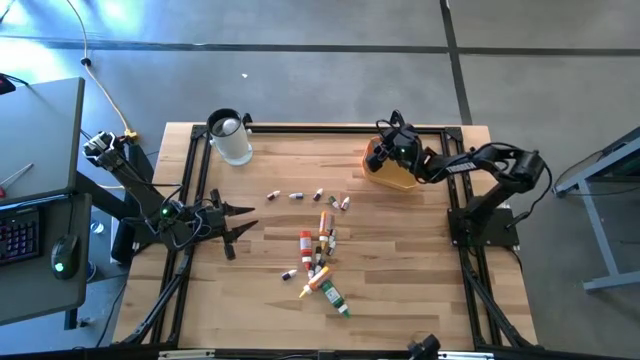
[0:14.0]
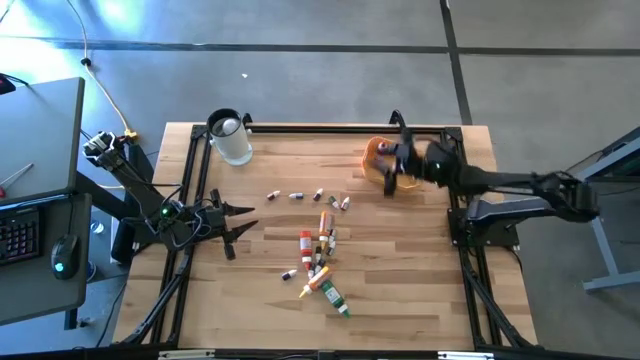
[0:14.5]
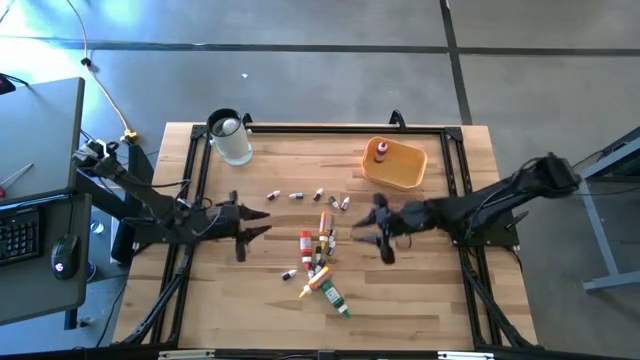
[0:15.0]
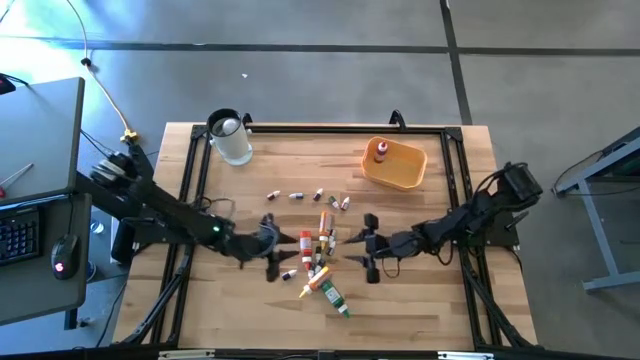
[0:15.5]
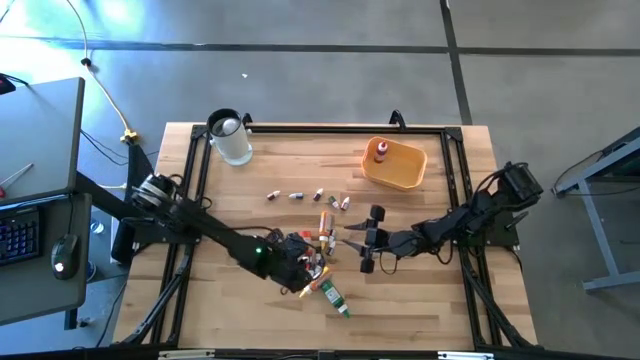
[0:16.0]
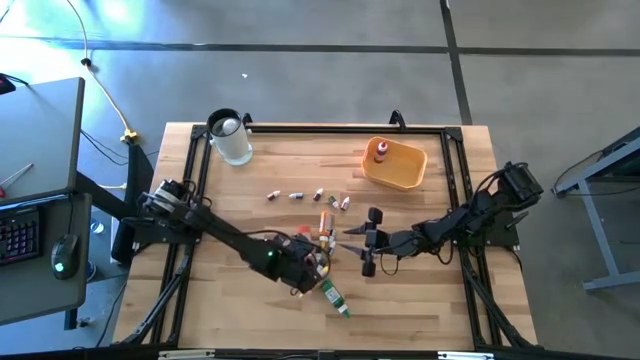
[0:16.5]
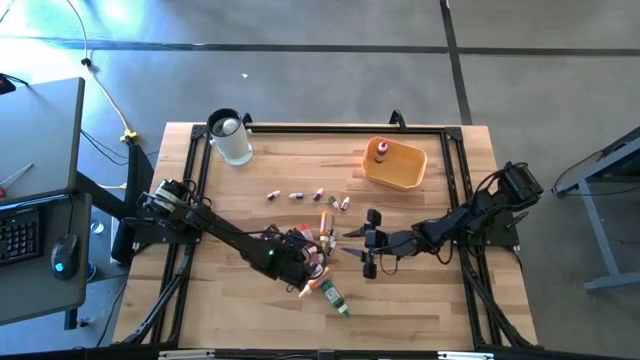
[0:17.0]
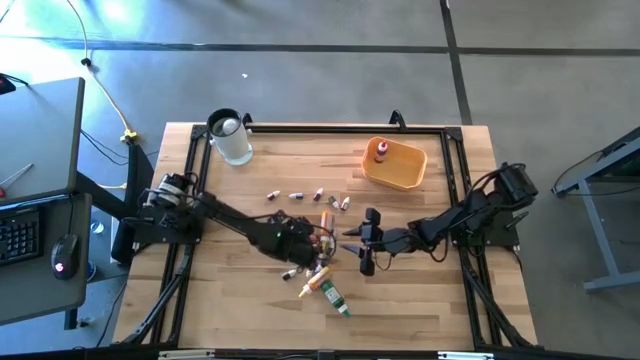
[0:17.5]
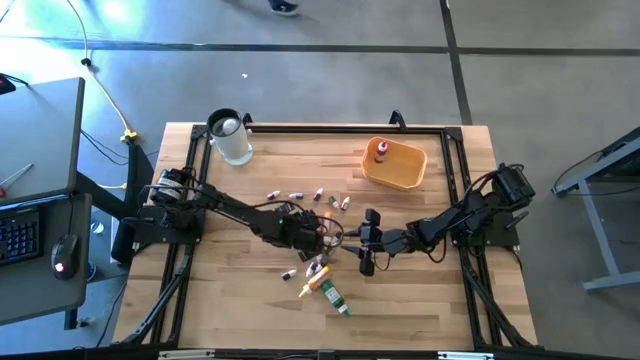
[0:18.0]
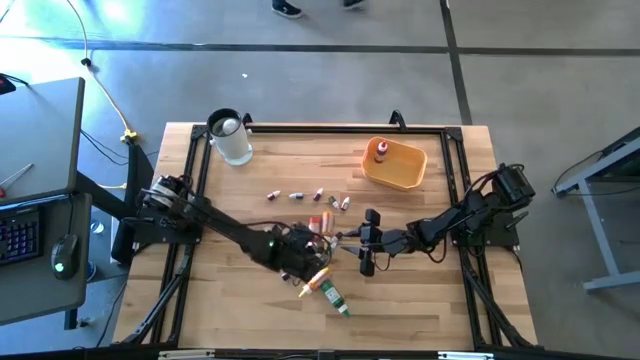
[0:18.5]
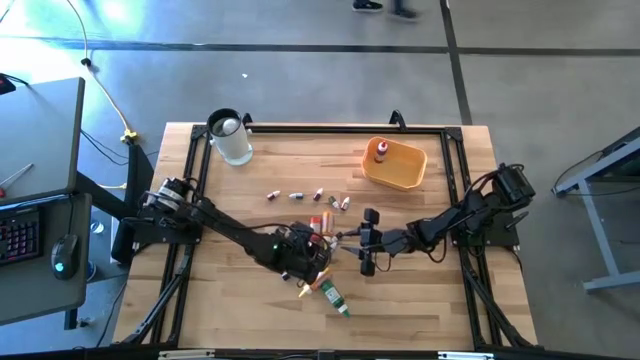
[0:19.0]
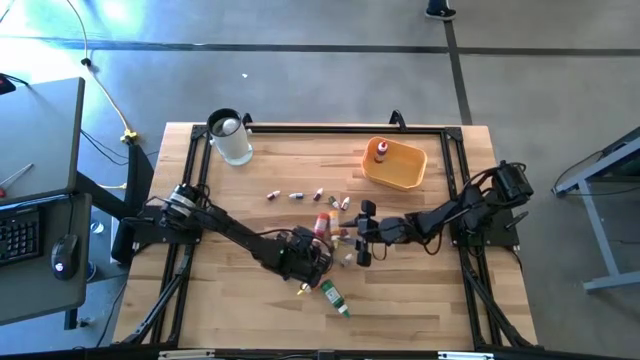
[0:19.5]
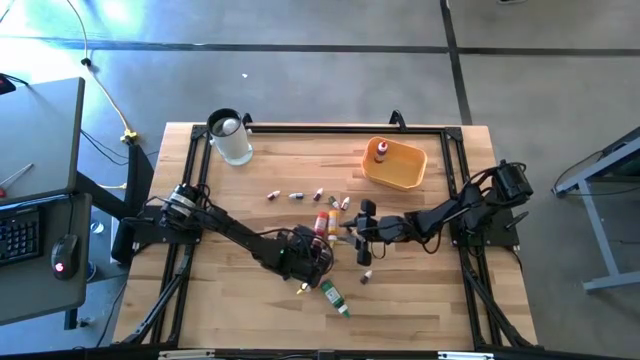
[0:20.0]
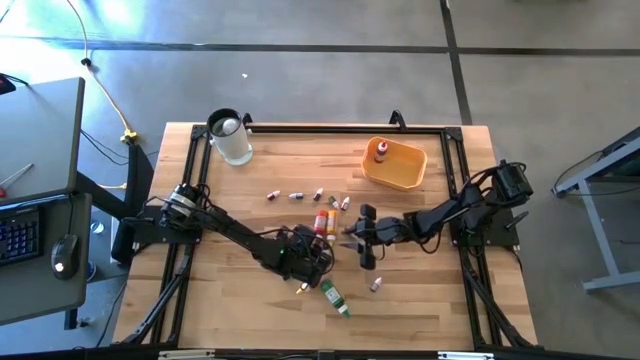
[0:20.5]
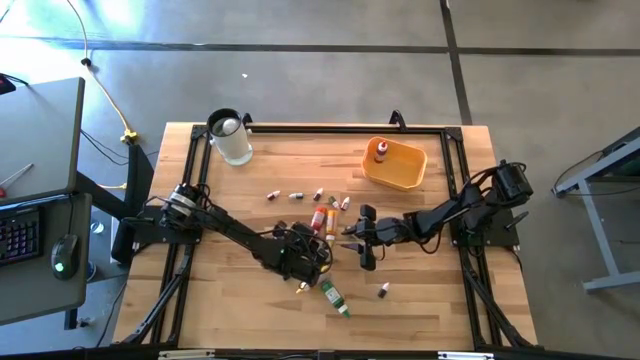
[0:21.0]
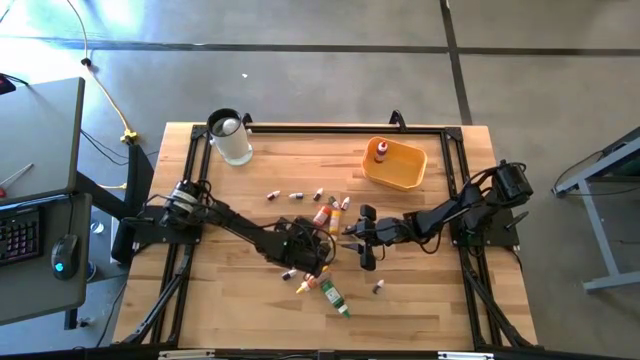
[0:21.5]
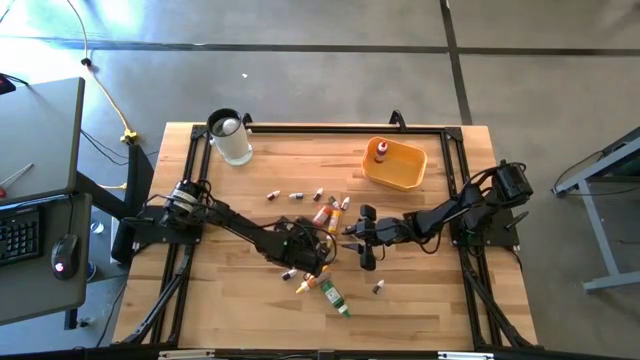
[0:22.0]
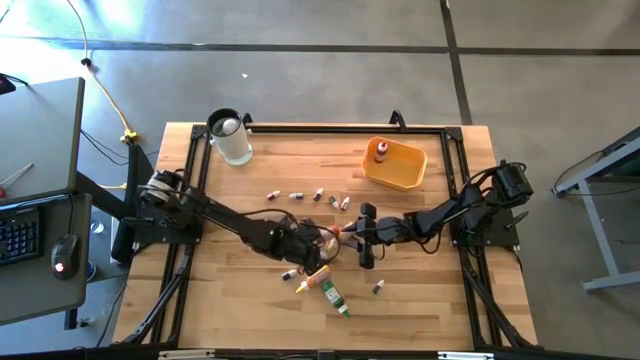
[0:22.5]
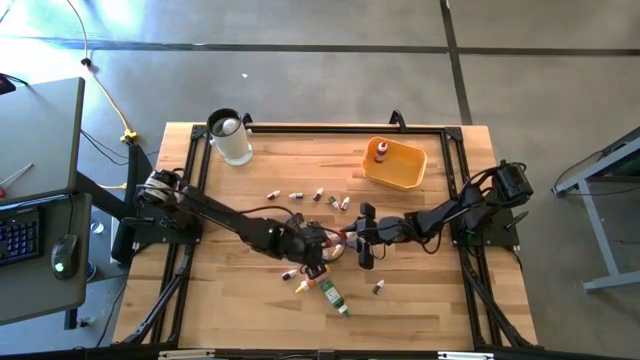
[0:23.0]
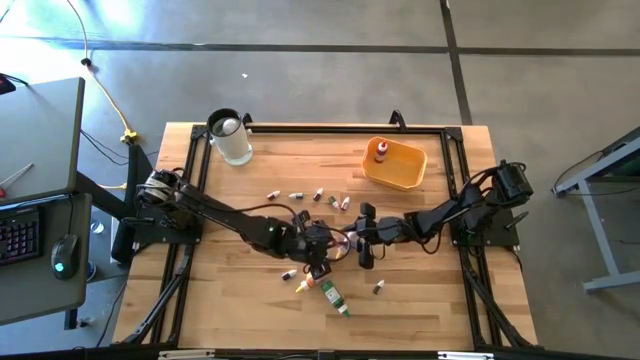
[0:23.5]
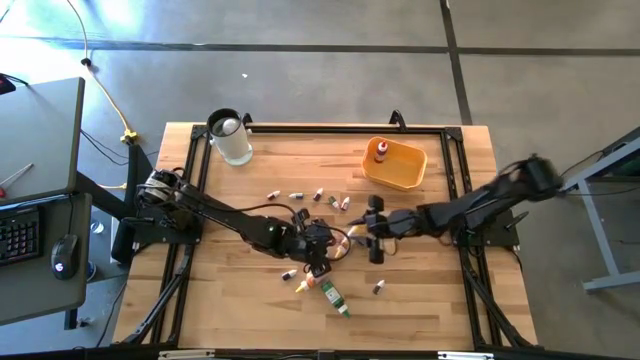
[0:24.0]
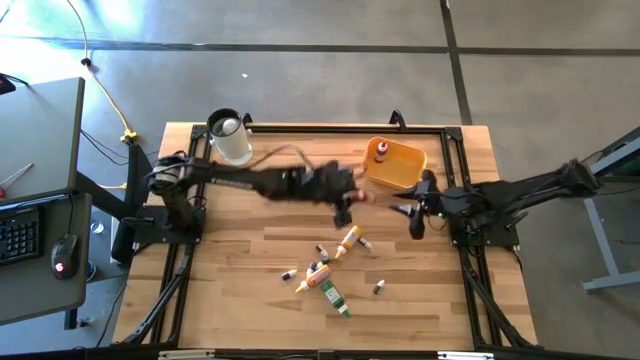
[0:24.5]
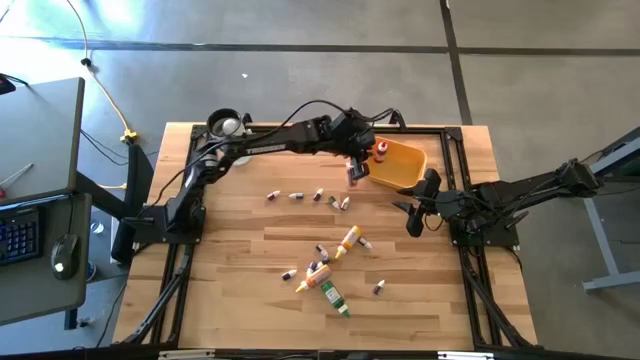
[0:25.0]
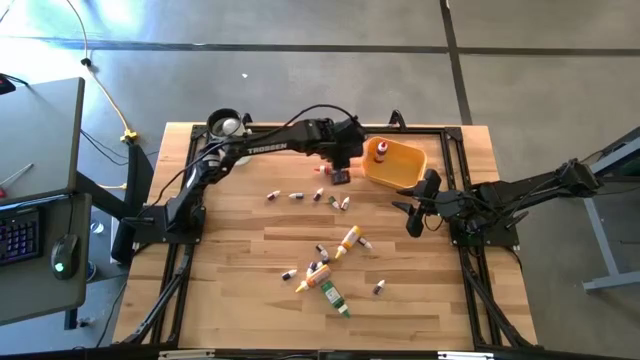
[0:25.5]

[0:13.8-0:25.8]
Task: Pick & Place food coloring
Put the large orange food coloring bottle into the yellow bin

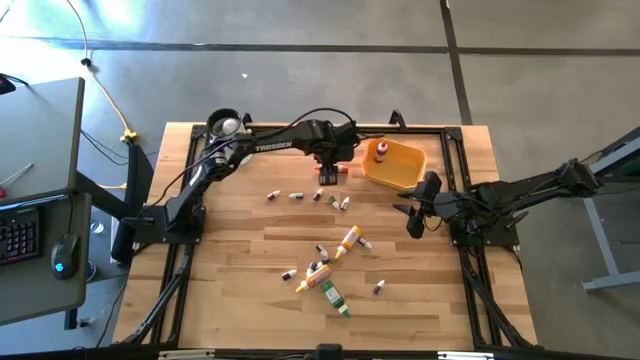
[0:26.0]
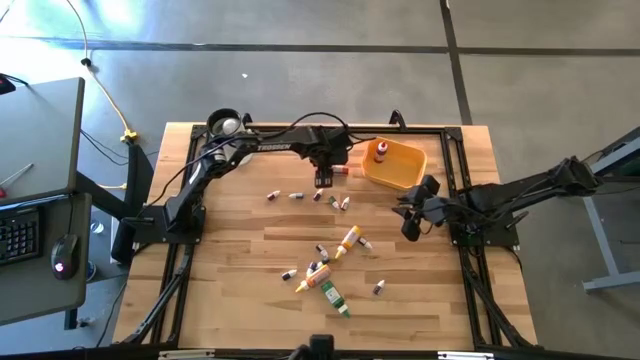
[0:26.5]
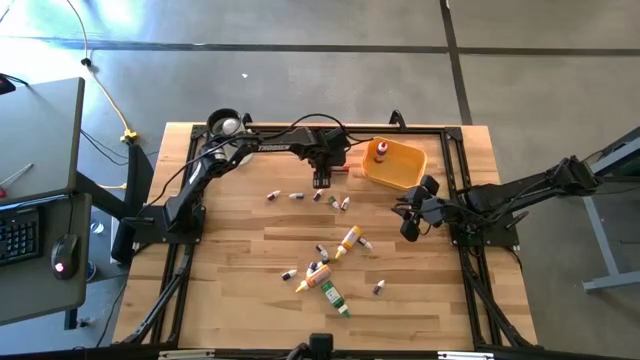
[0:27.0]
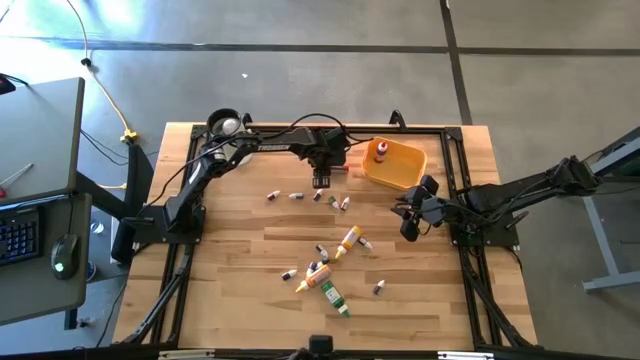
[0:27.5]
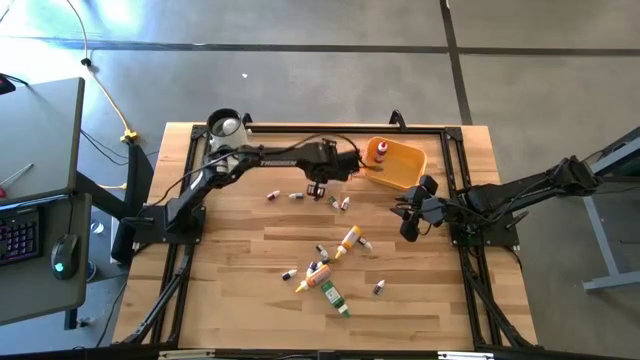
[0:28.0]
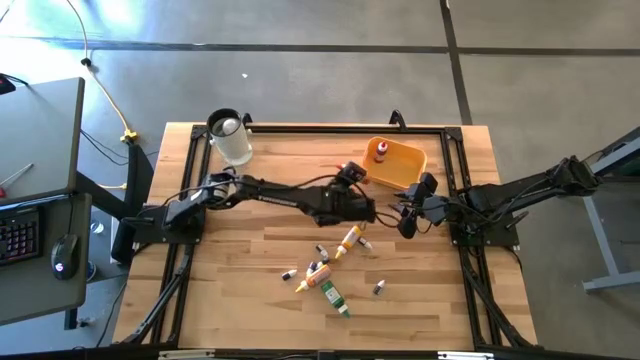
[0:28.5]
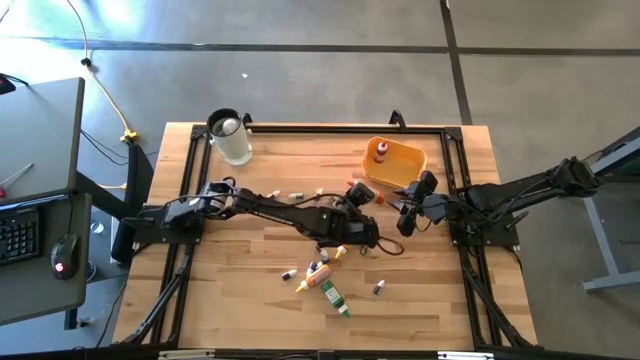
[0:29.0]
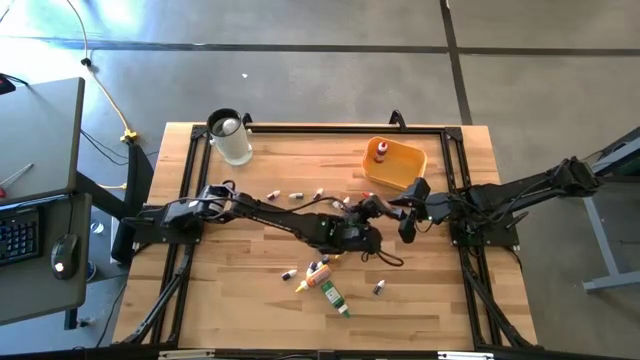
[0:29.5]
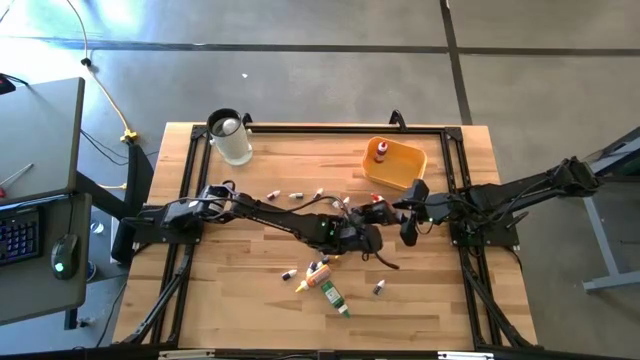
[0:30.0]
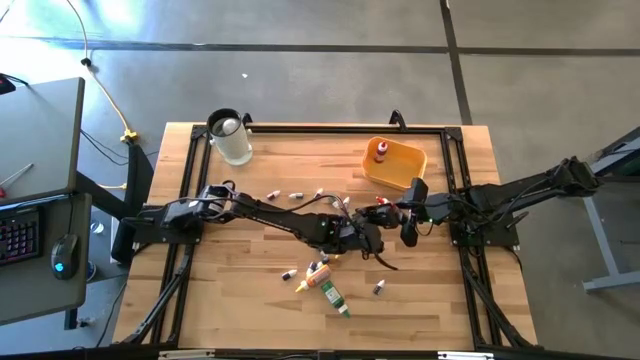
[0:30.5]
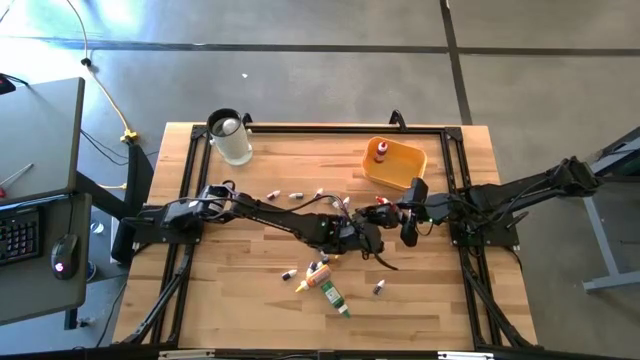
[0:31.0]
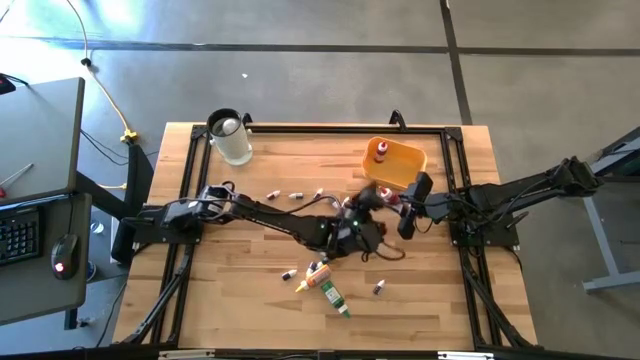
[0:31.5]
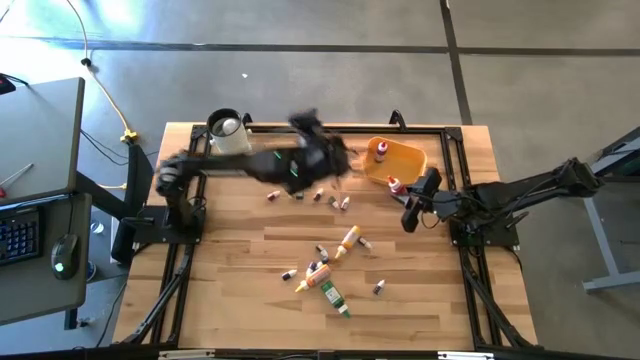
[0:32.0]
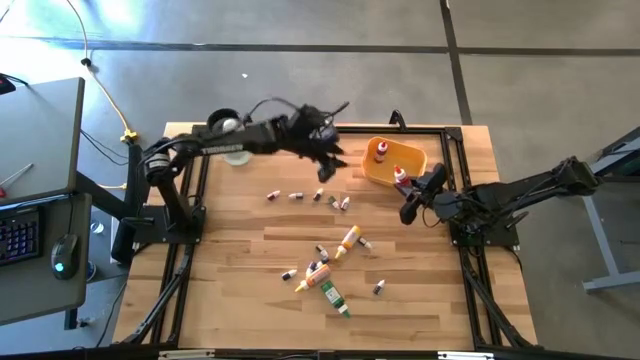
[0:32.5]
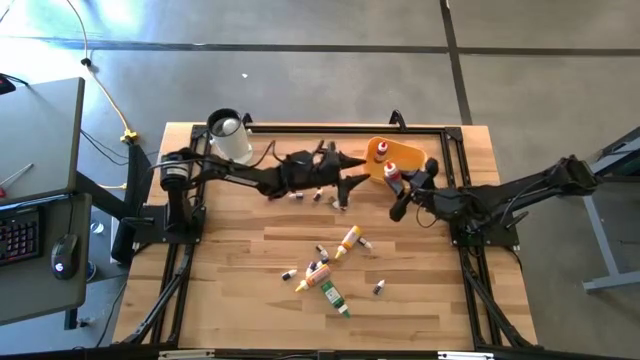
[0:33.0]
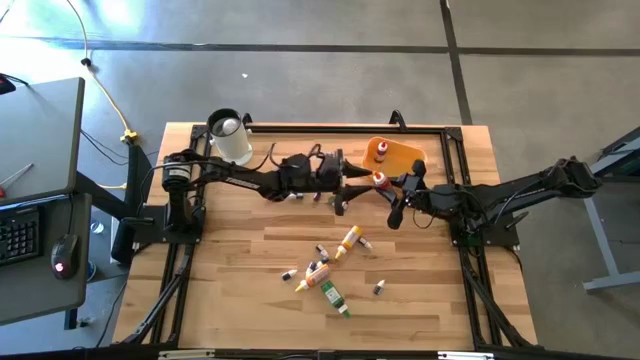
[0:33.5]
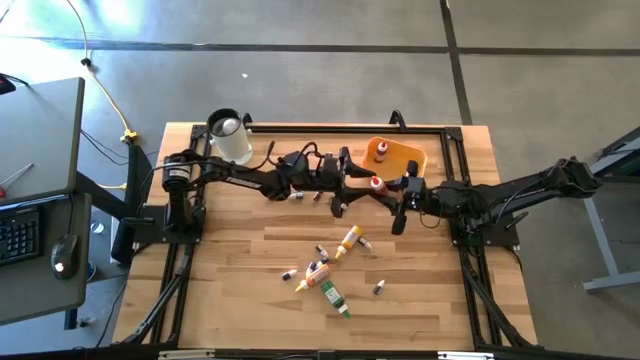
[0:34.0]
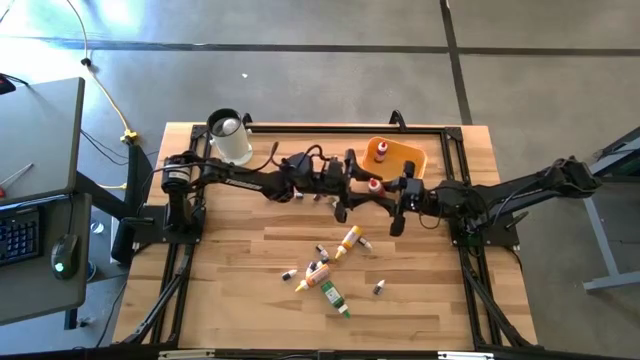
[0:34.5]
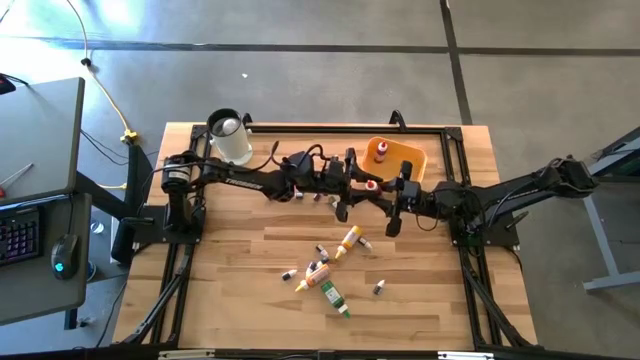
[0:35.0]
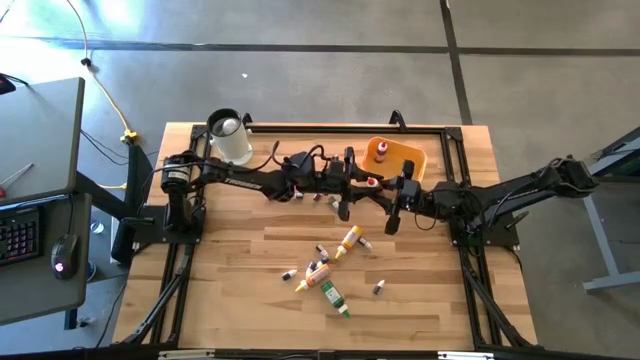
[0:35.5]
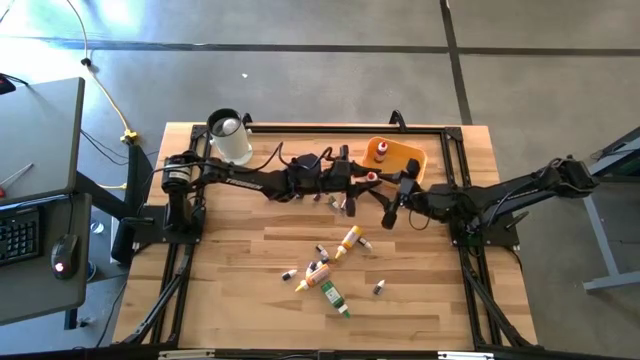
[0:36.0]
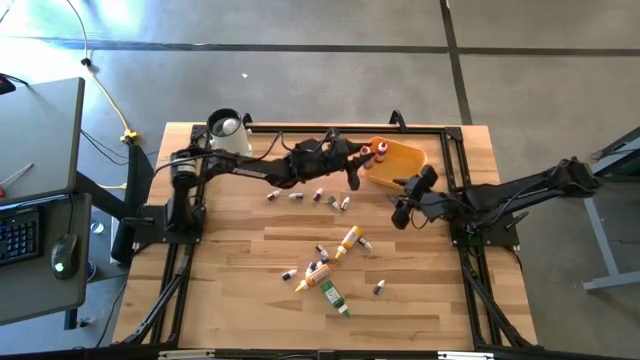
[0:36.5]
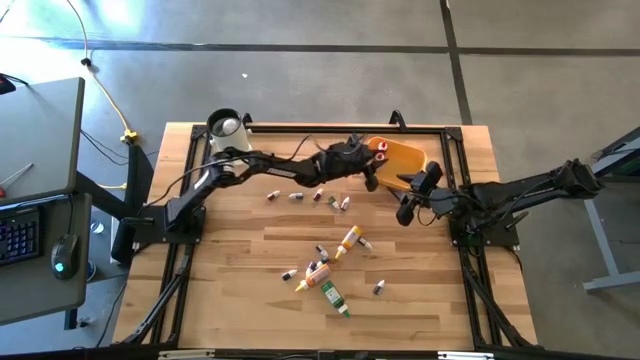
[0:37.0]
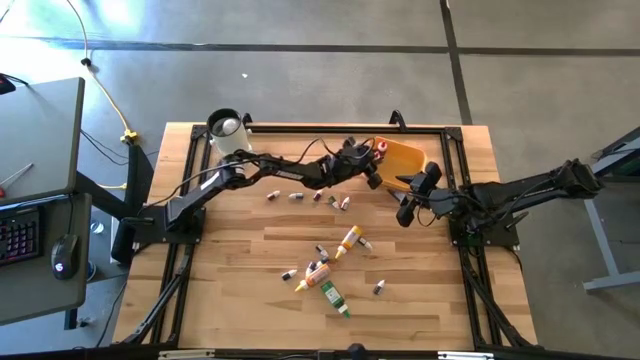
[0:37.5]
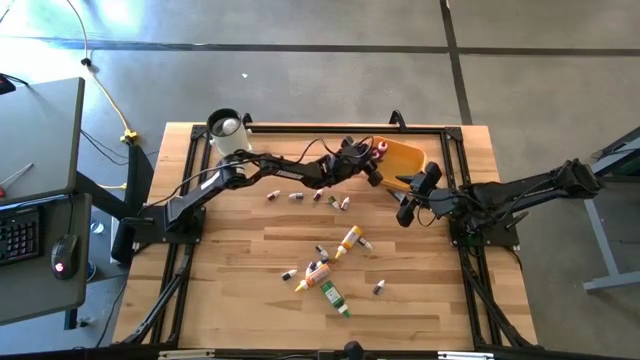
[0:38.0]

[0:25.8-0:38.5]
Put the large orange food coloring bottle into the yellow bin
